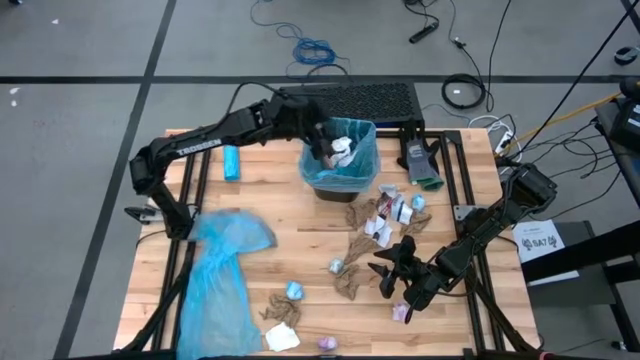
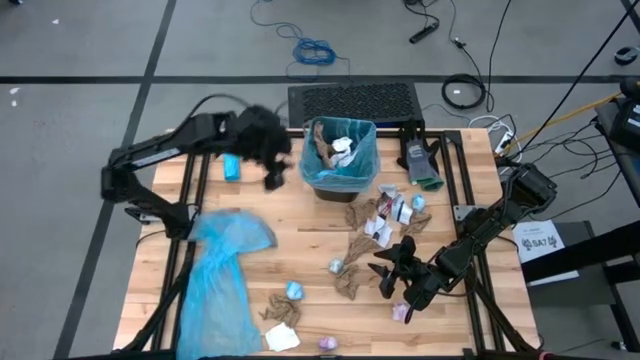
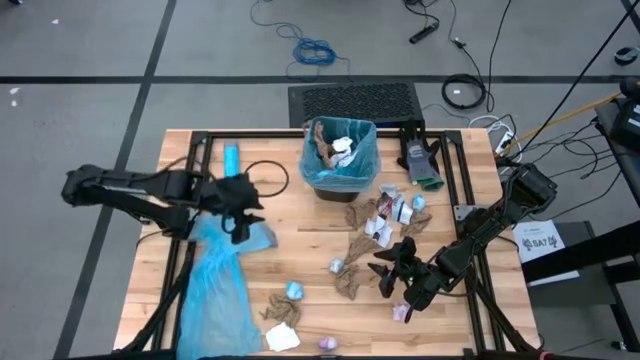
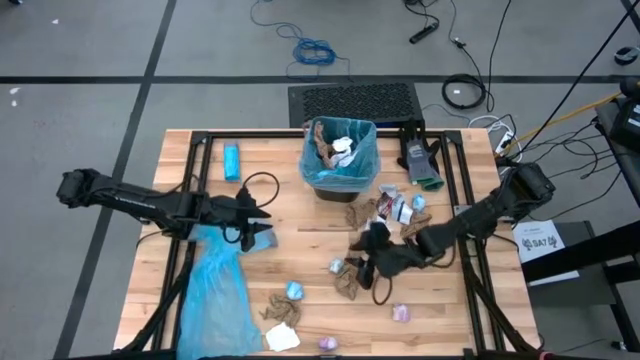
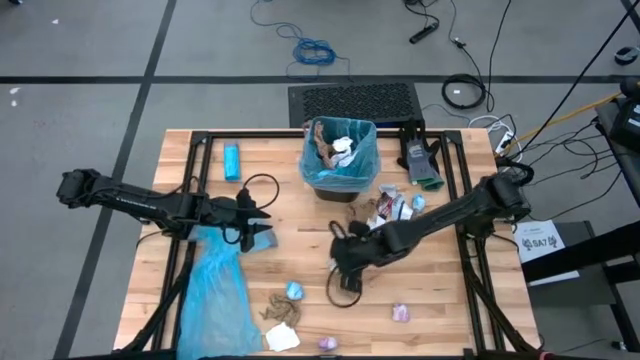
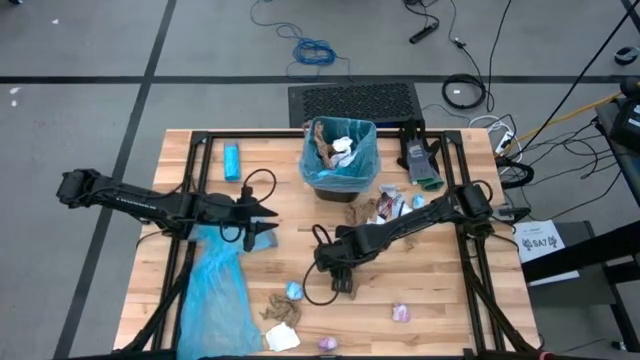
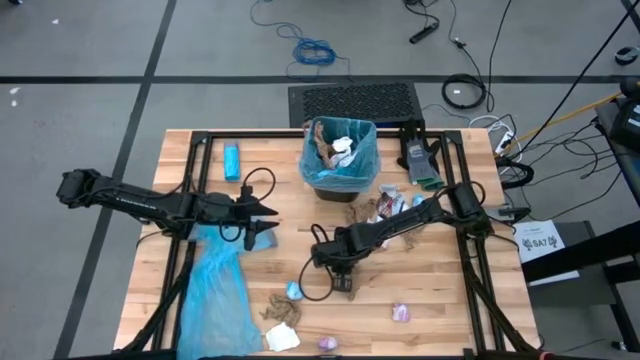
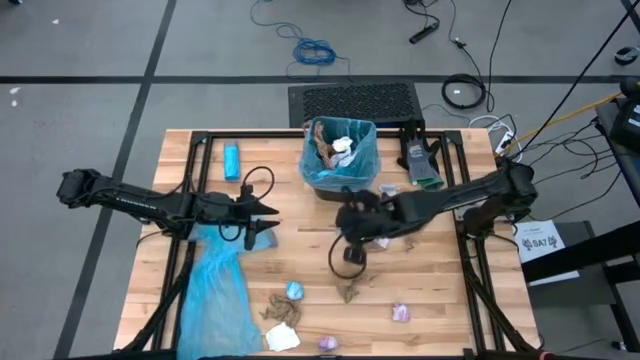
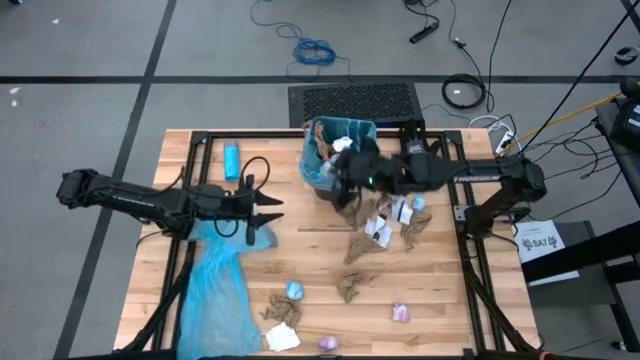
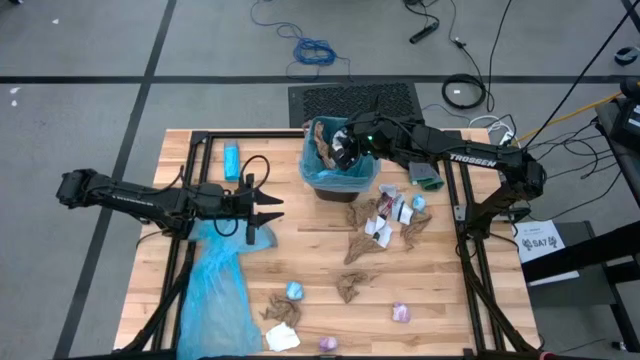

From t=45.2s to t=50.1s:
Task: place trash/remove bag and relplace
Put the blue plastic into the trash bin

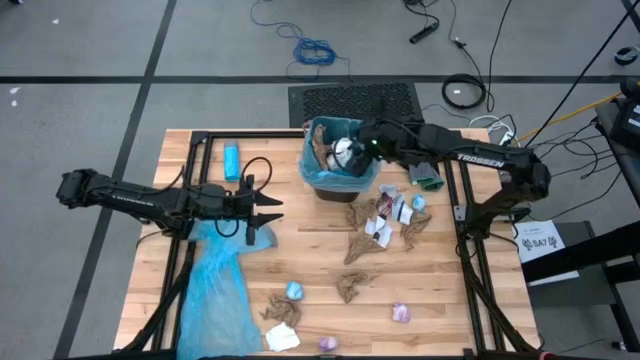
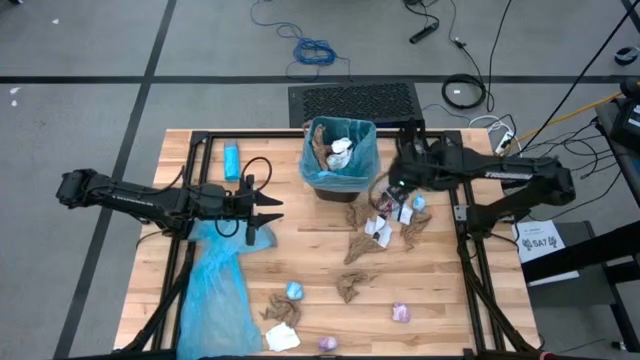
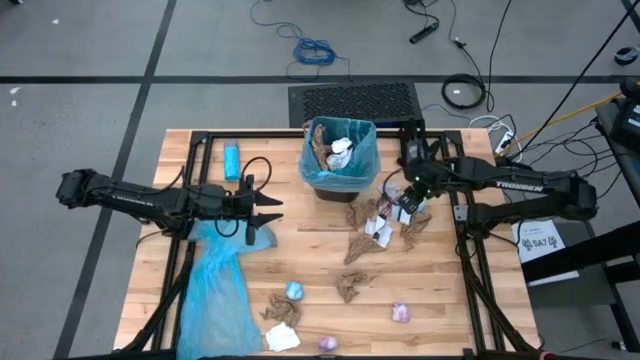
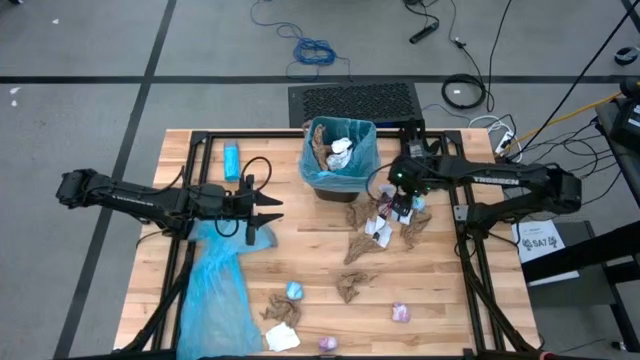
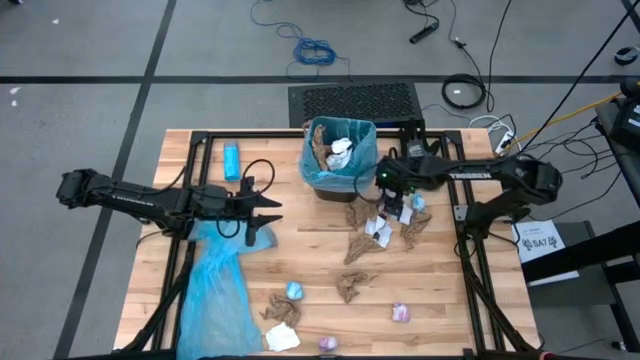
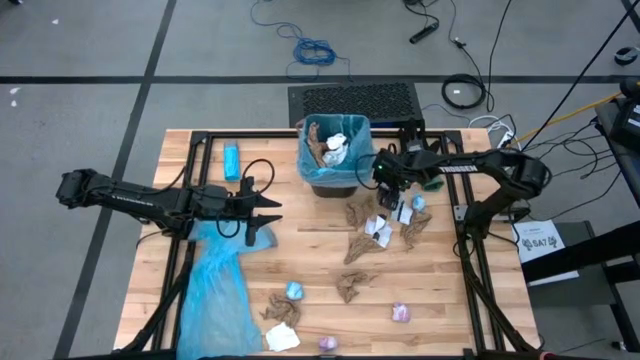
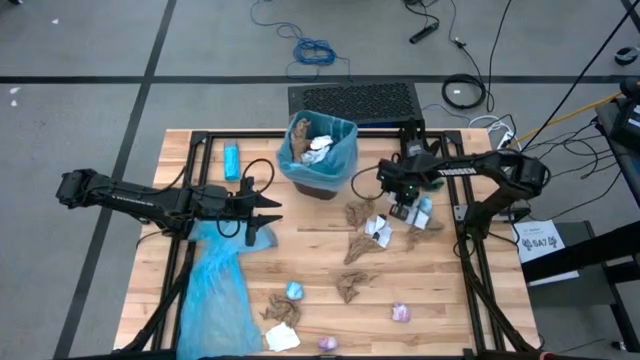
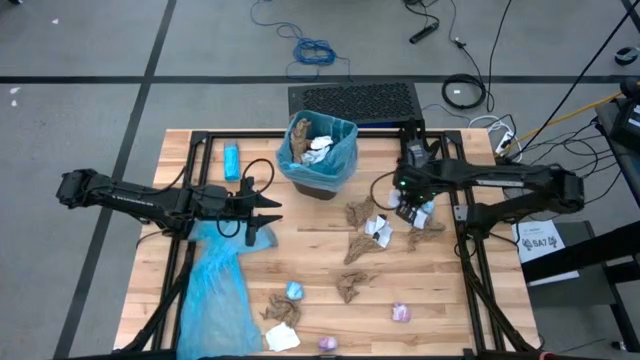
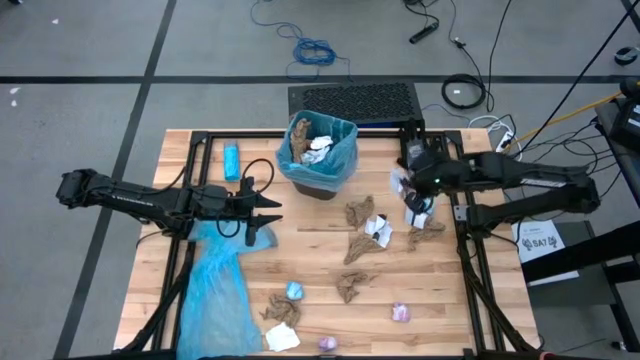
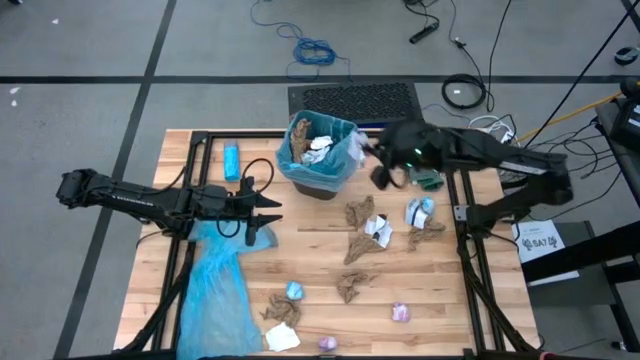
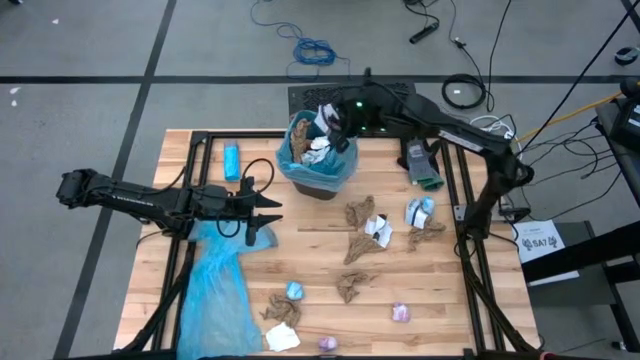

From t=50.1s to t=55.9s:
Put the white paper into the trash bin

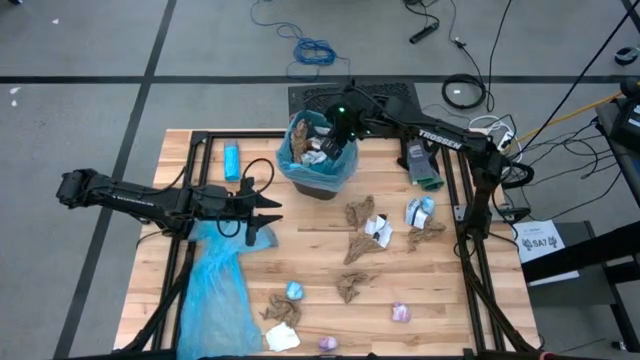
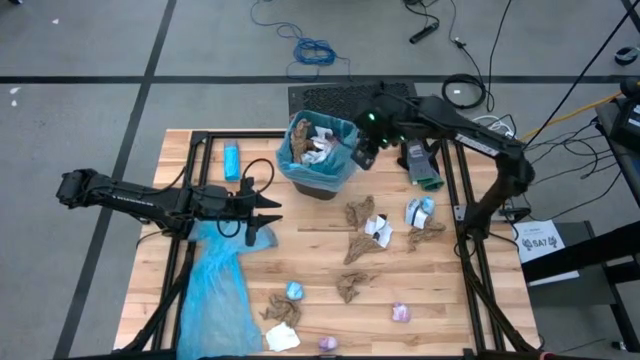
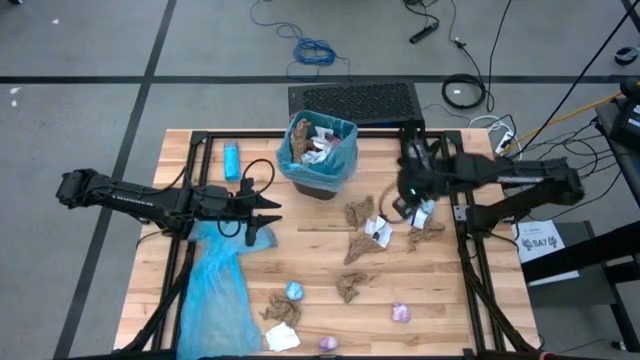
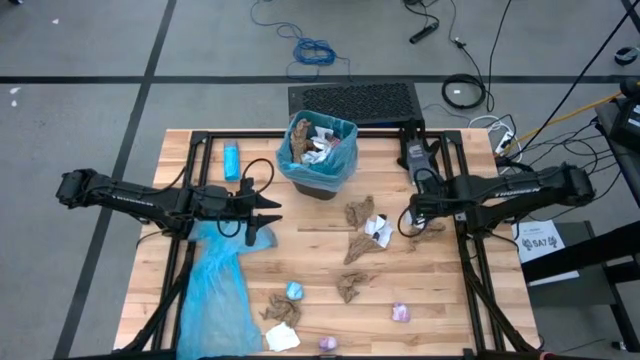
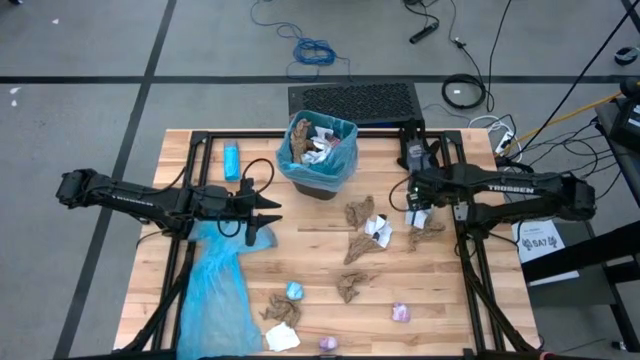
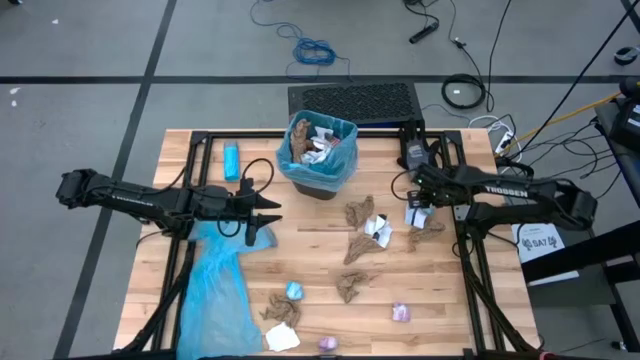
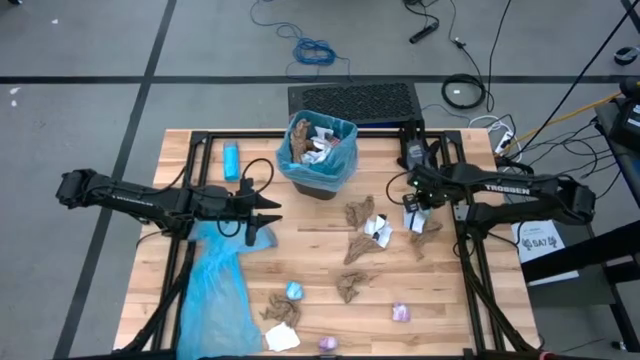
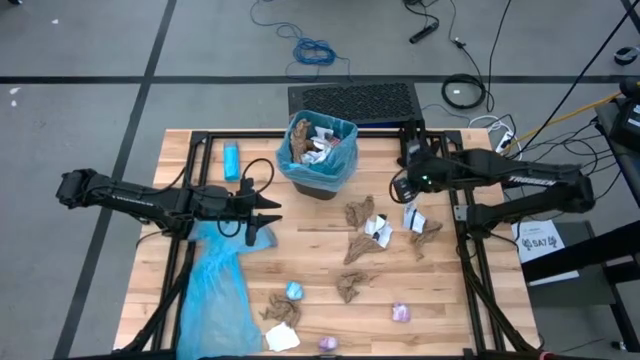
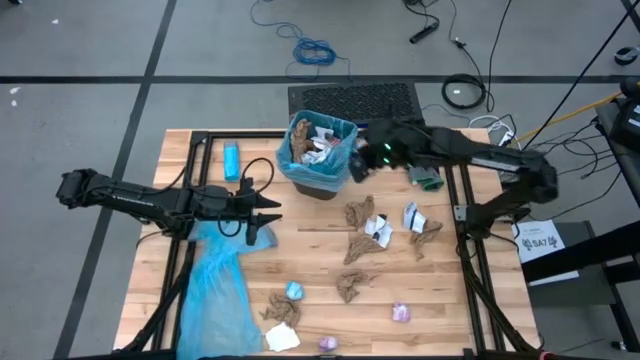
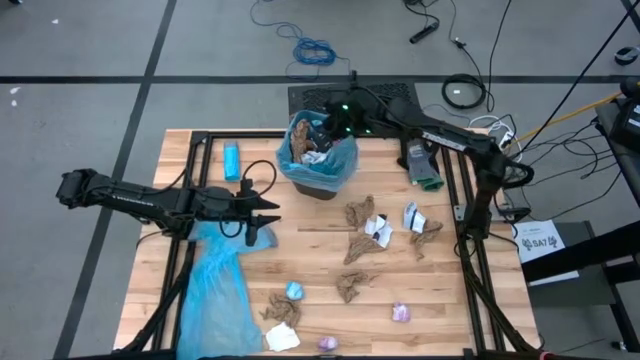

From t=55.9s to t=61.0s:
Put the blue plastic into the trash bin

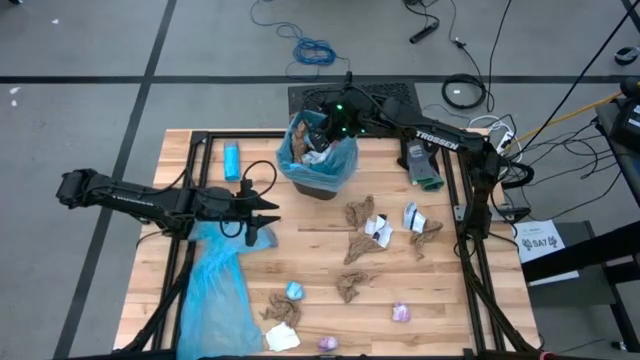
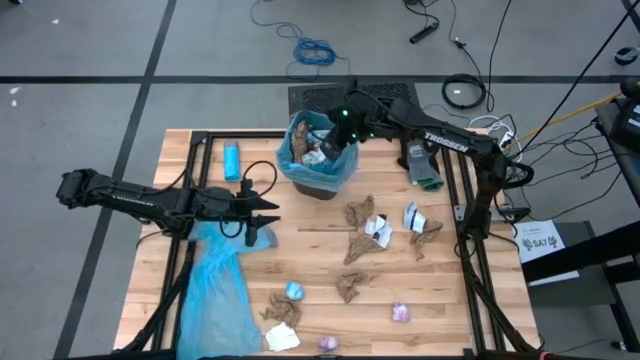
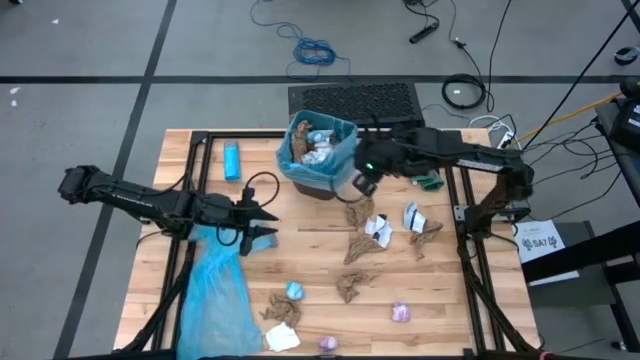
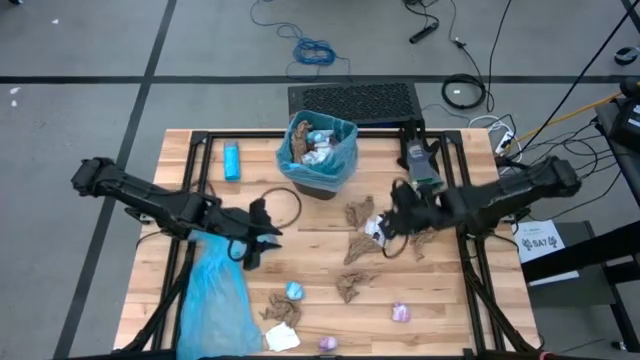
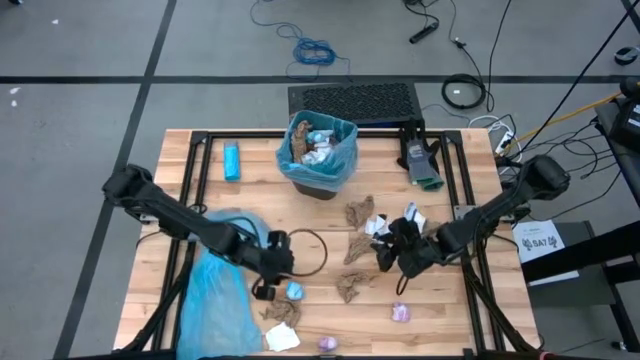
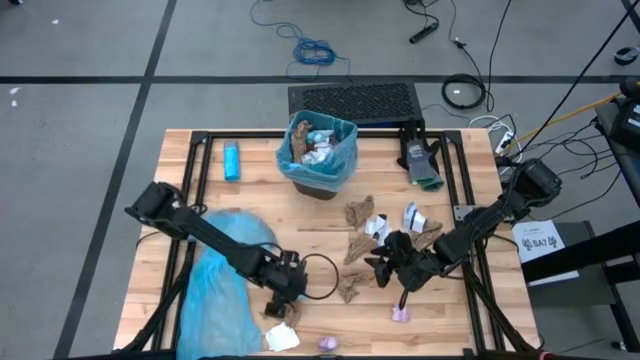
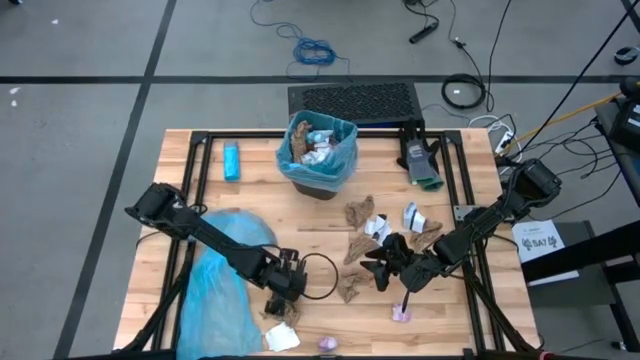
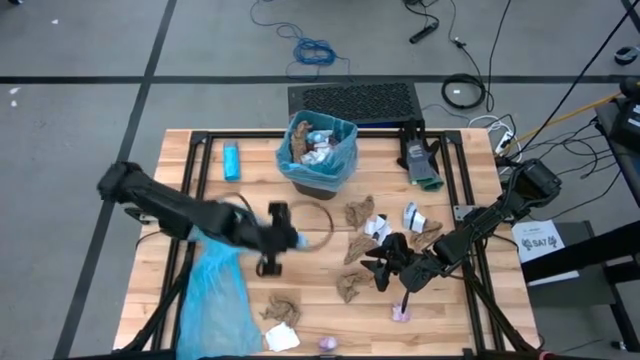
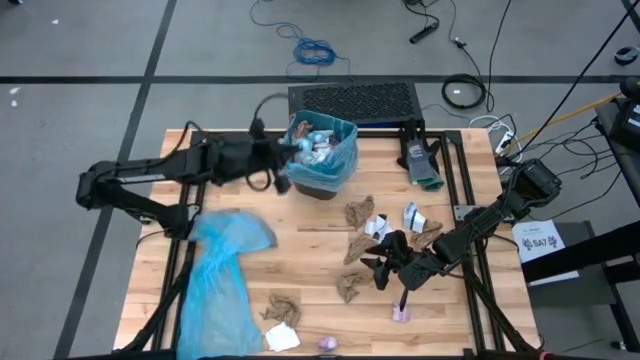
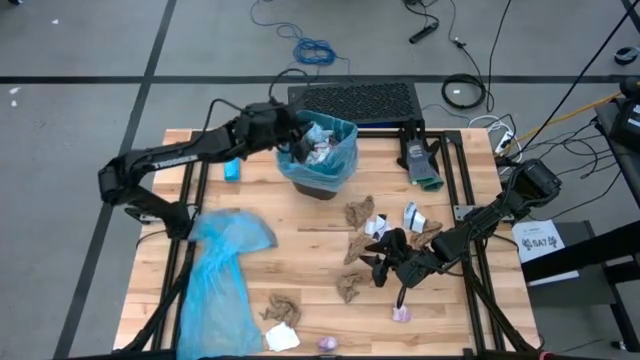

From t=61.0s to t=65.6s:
Put the blue plastic into the trash bin
